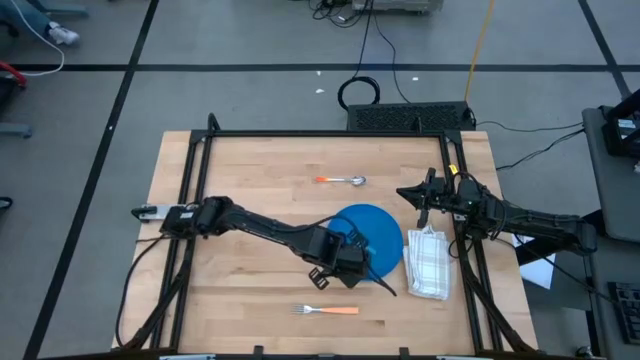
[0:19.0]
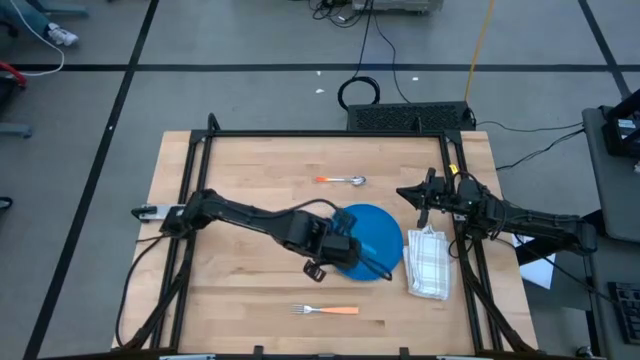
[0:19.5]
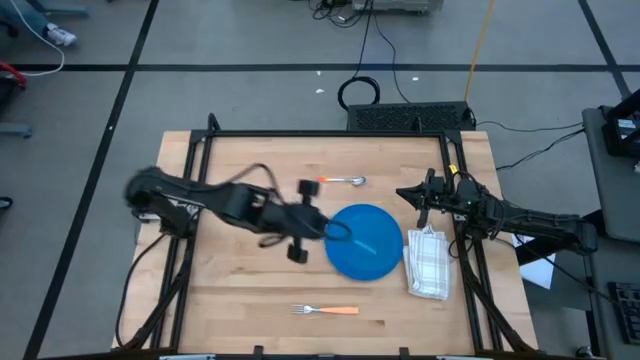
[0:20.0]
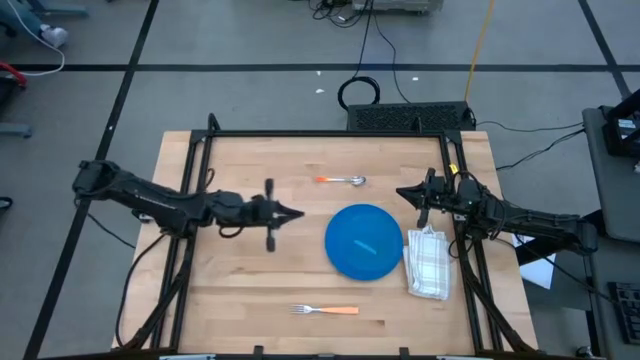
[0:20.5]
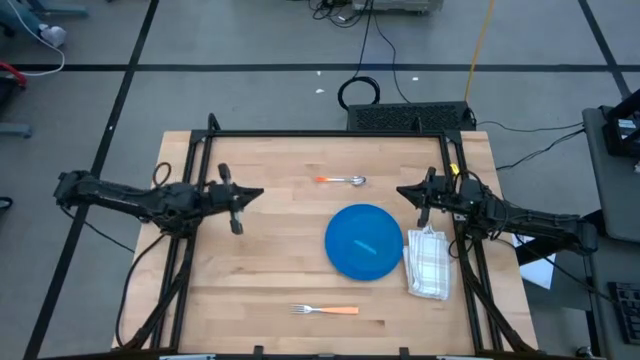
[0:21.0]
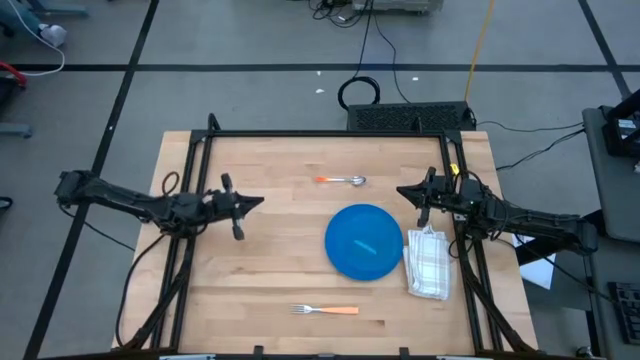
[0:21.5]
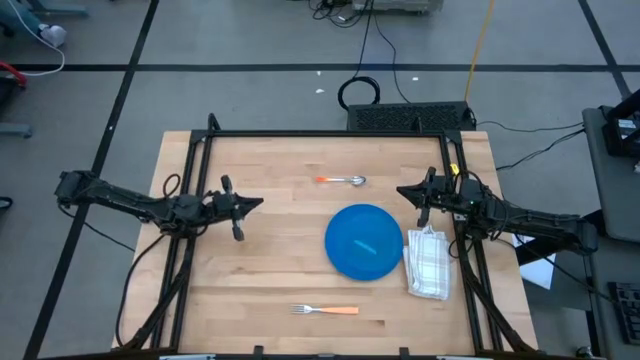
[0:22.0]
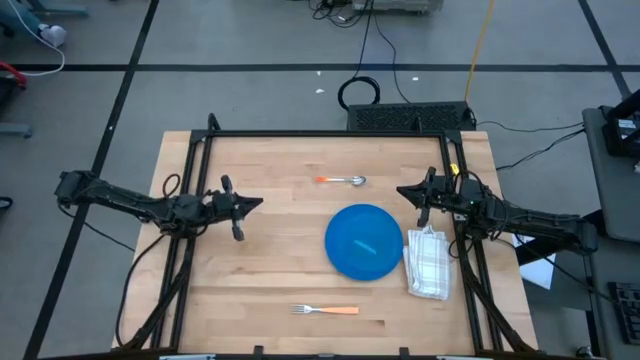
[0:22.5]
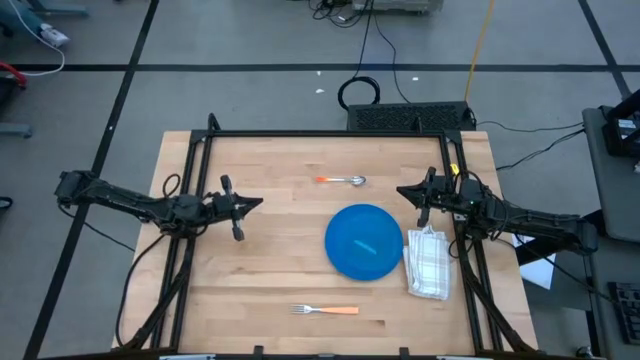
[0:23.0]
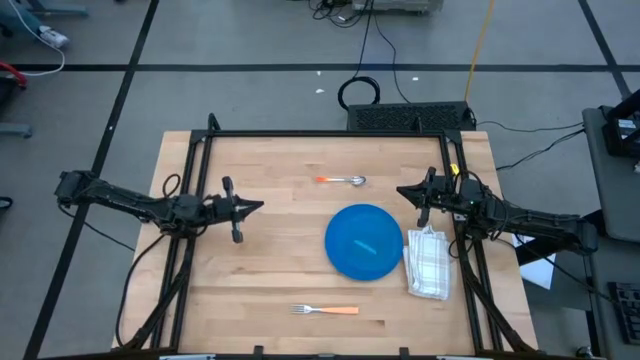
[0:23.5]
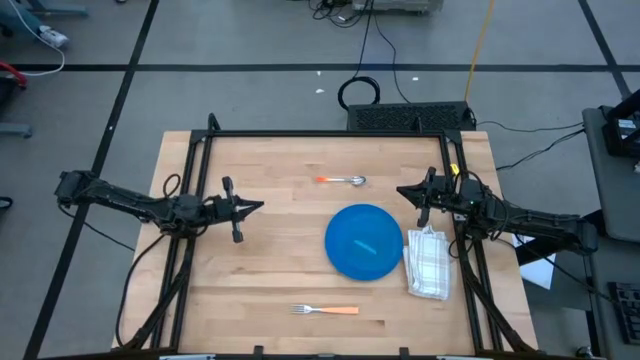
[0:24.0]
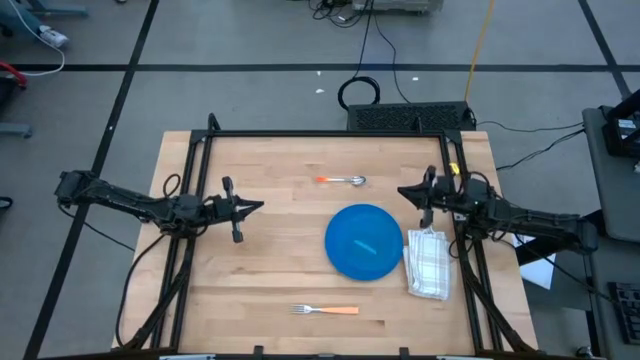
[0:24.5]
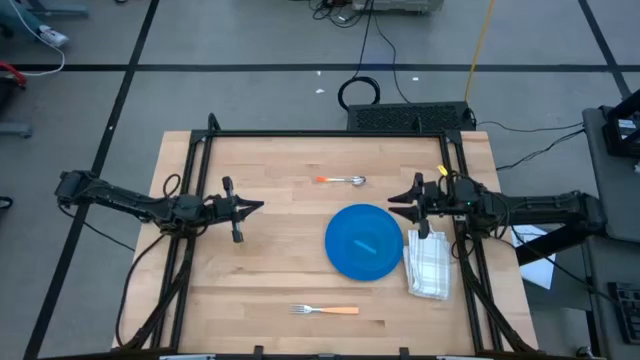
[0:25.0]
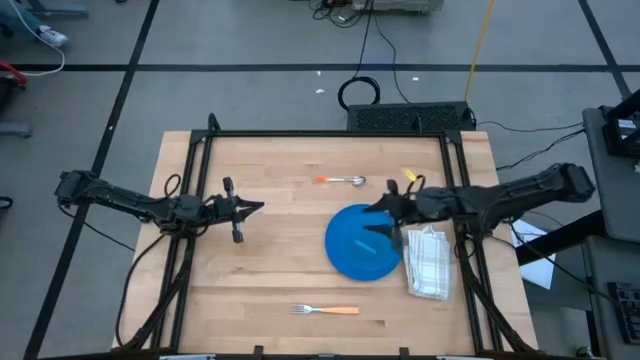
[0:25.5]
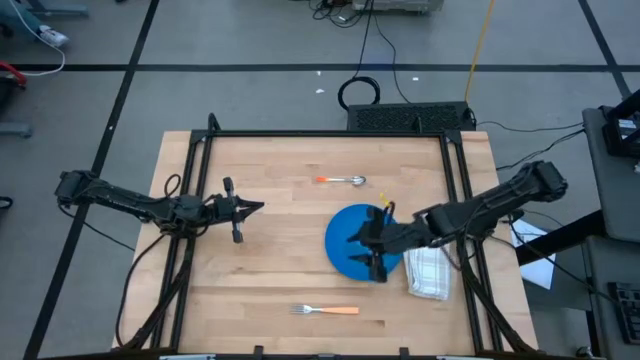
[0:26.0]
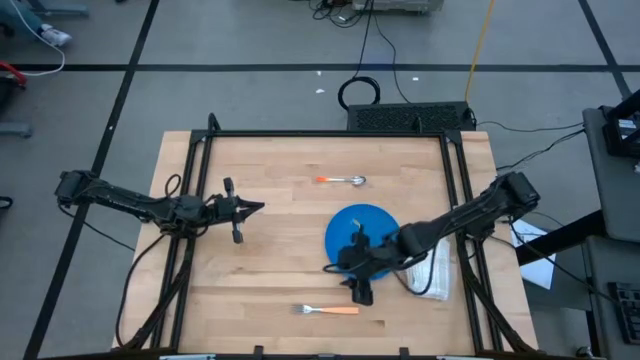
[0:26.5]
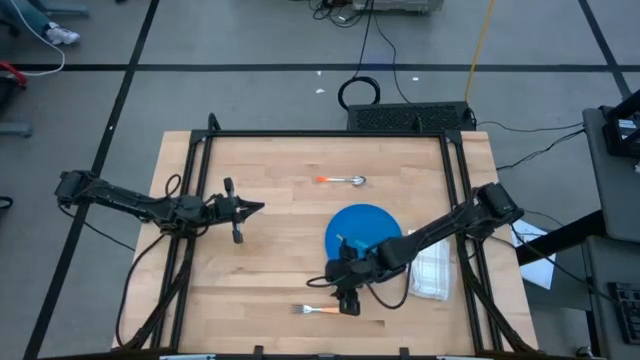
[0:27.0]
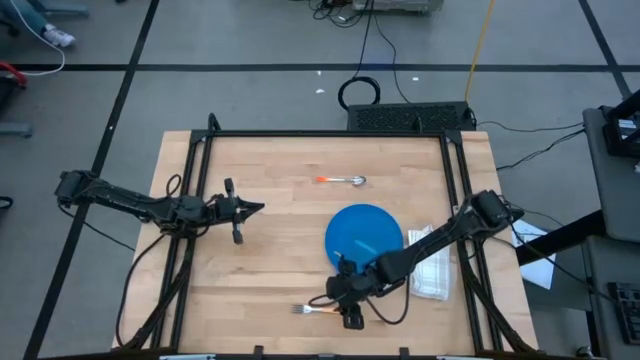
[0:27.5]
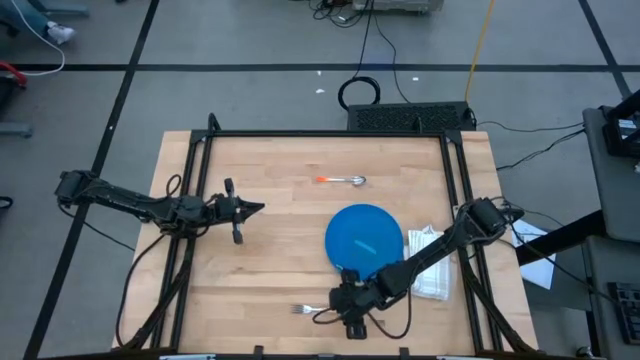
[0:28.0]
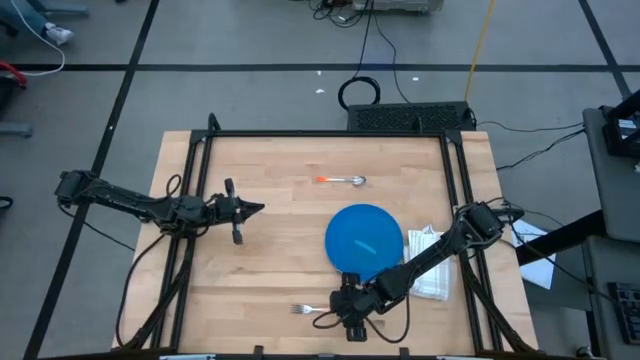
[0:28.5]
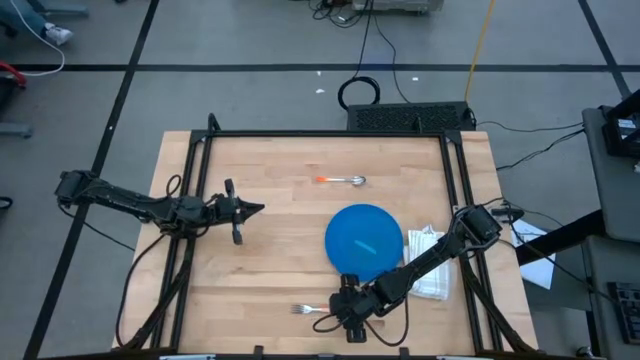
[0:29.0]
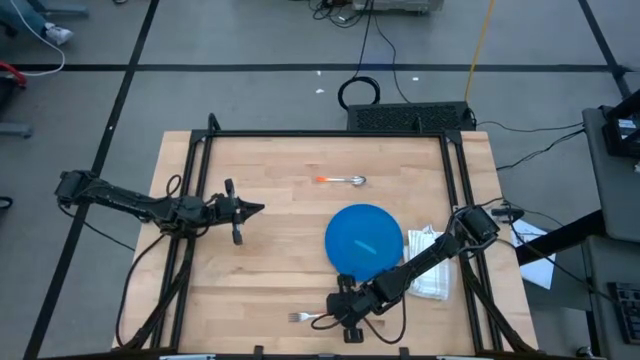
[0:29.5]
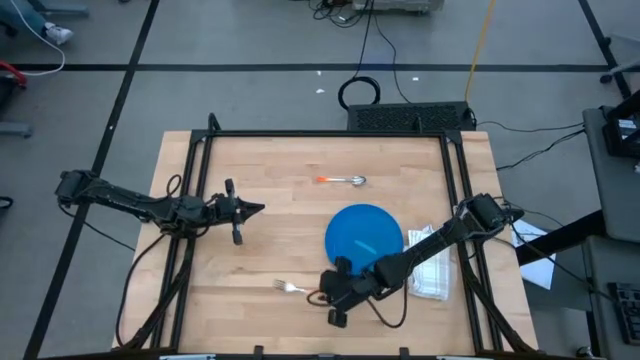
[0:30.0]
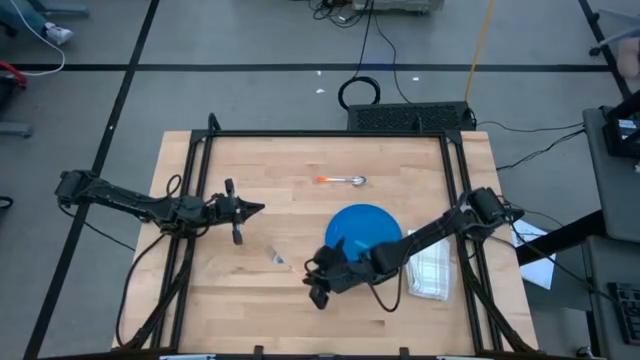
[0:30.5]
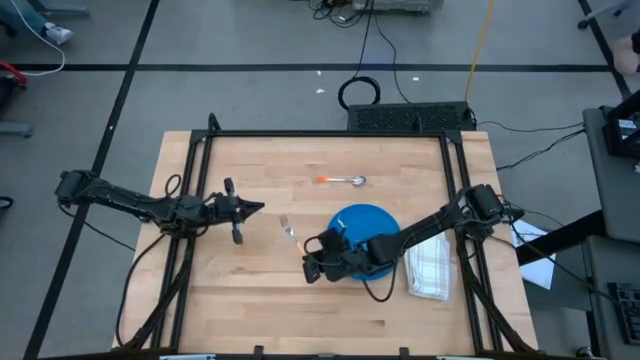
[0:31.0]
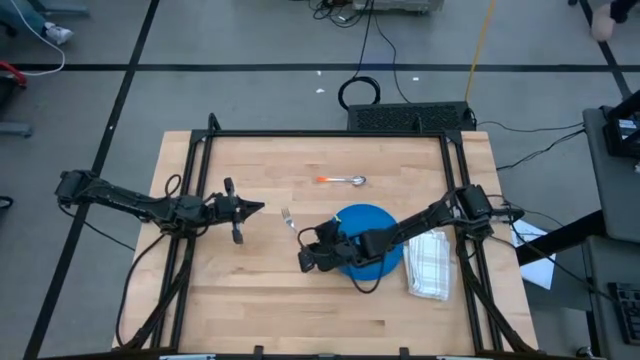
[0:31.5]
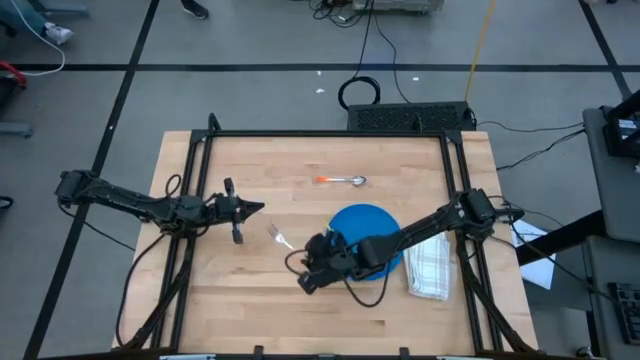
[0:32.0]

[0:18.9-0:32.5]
Task: Set table place
Put the light orange fork to the left of the blue plate

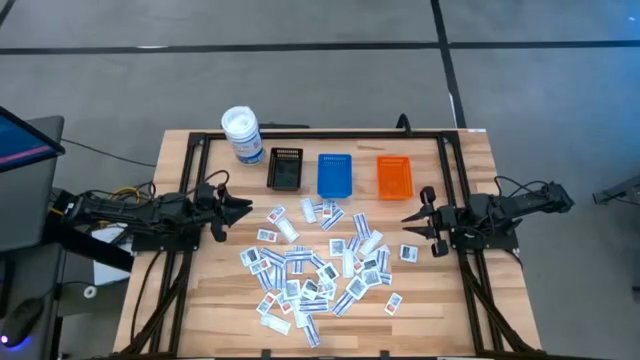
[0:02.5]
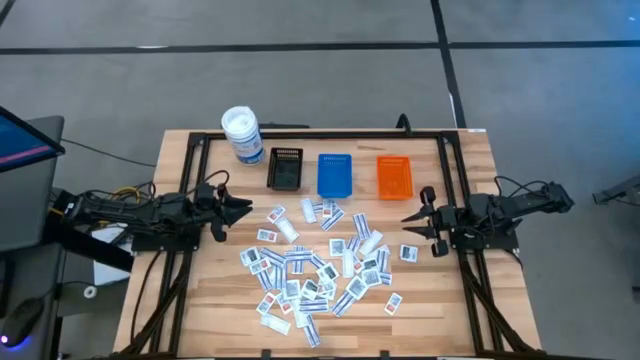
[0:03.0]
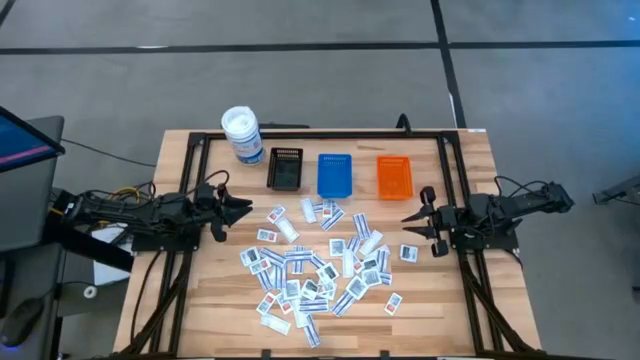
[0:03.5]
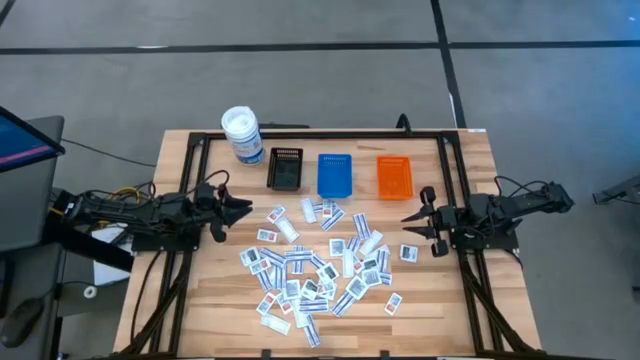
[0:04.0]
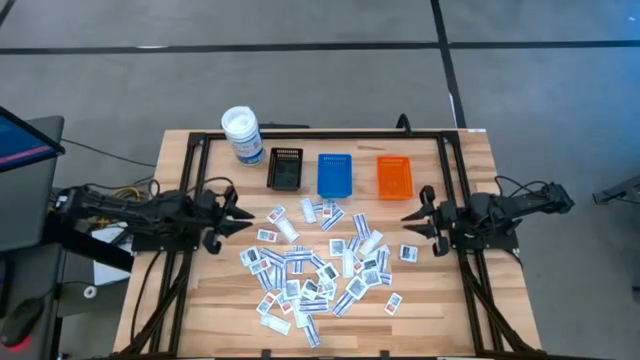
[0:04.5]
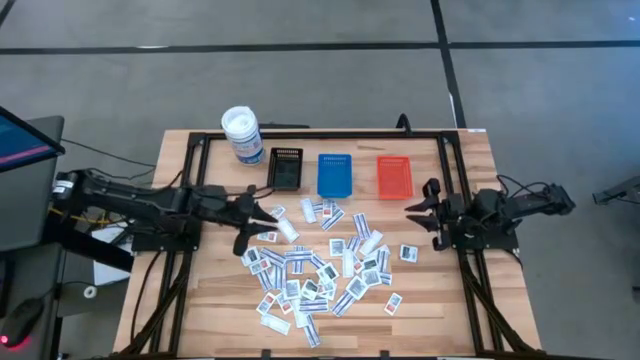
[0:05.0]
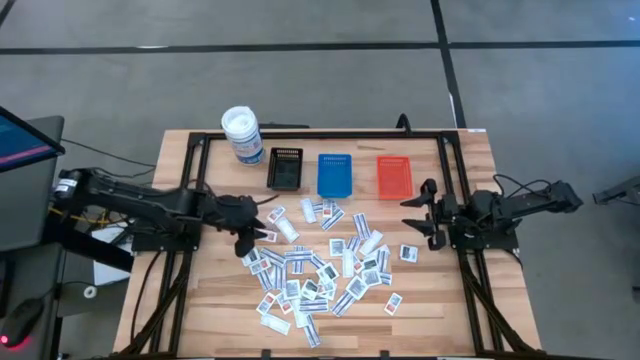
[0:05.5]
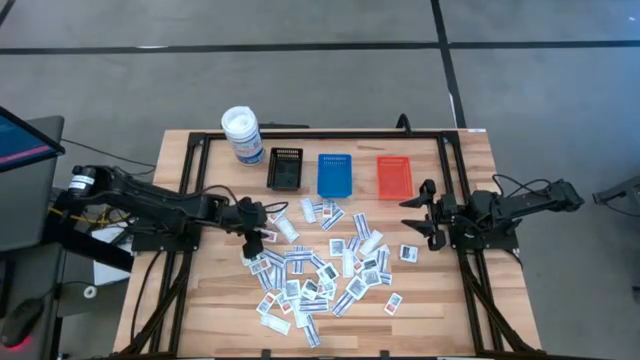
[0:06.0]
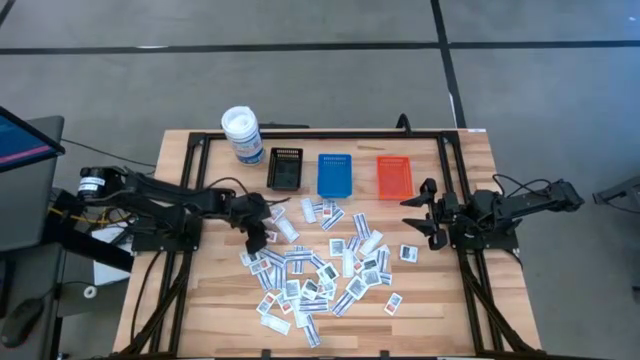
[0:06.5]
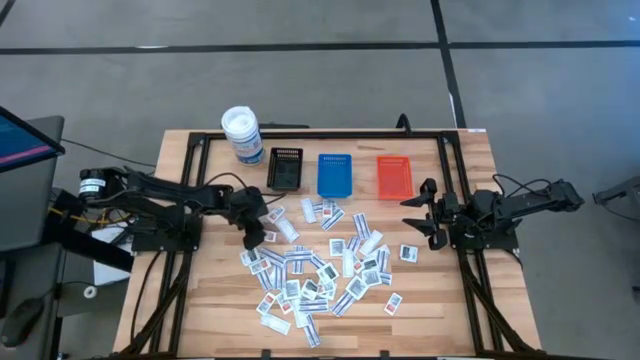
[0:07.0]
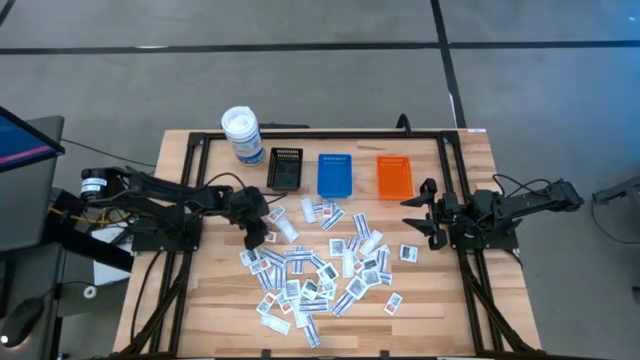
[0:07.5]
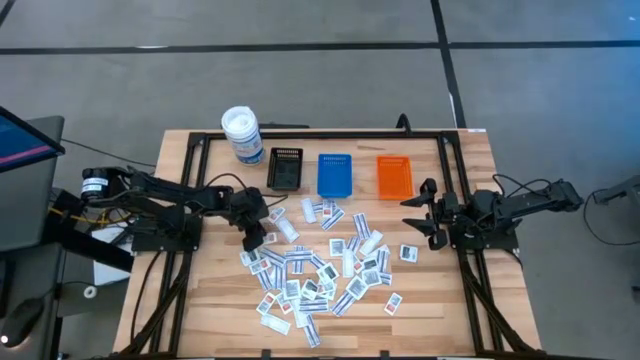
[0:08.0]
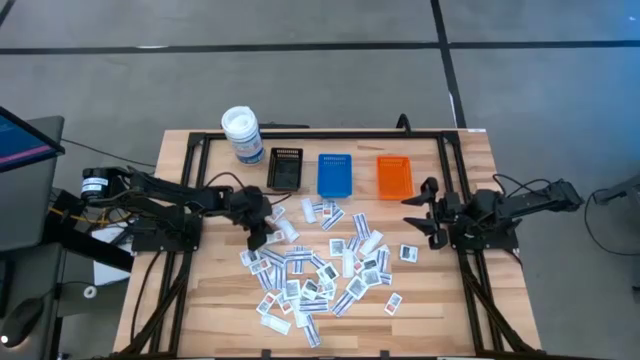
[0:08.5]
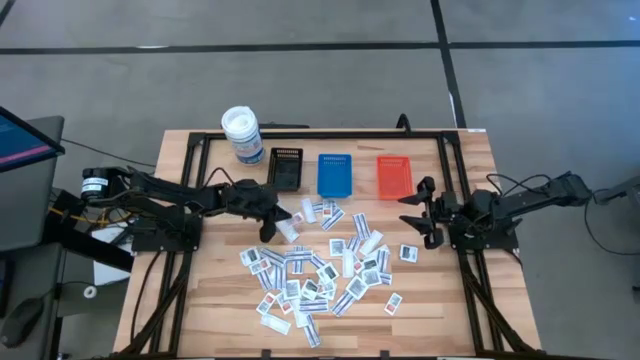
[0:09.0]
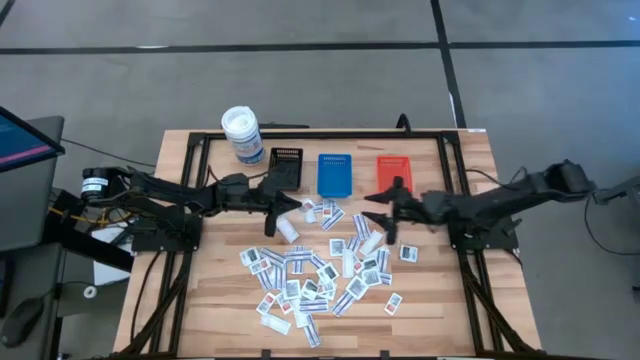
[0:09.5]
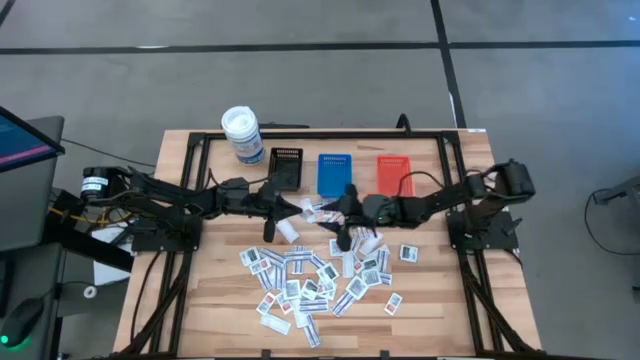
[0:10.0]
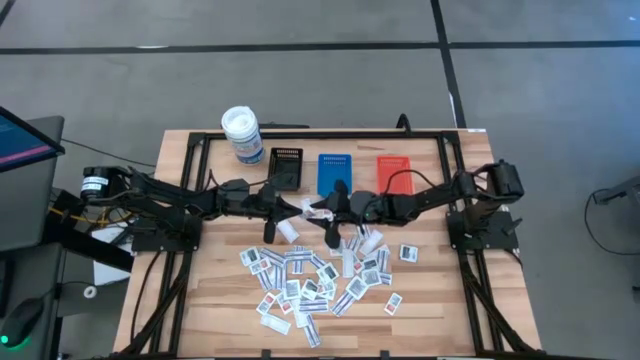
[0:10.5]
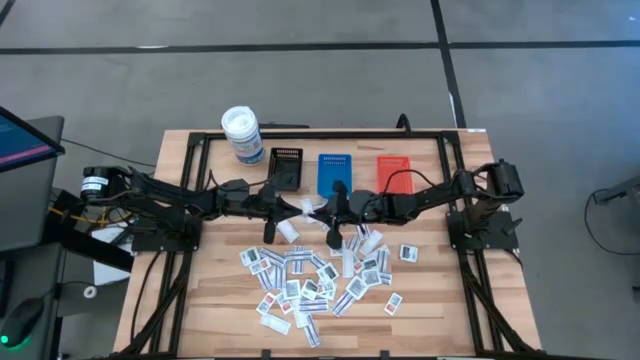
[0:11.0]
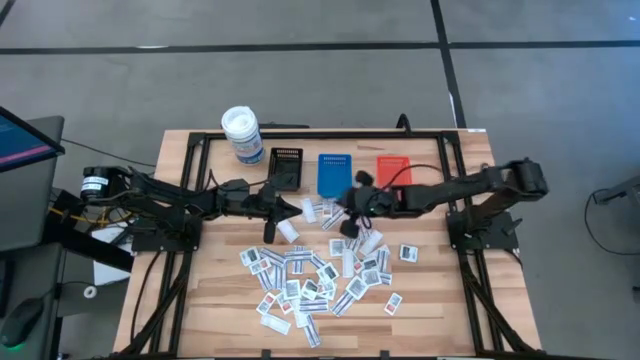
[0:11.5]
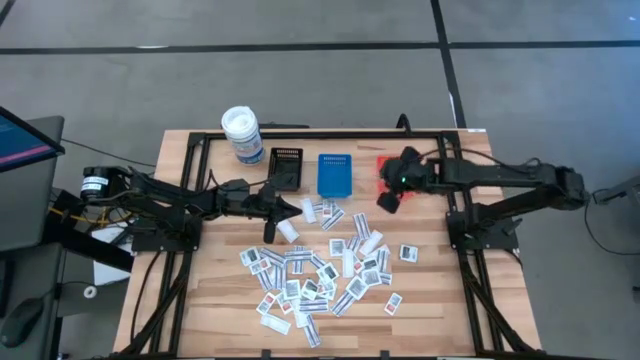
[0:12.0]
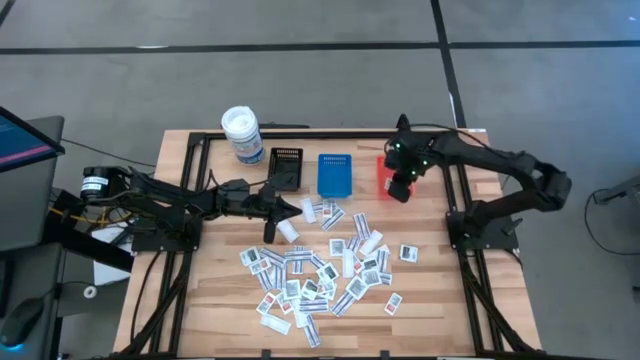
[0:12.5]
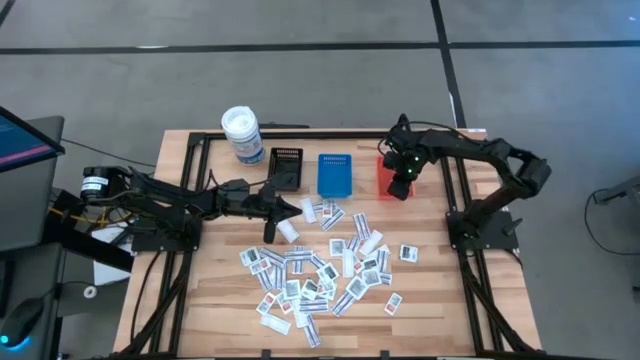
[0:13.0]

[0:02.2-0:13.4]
Task: Pick & Place First Aid Supplies
Put the orange ointment pack into the orange bin
